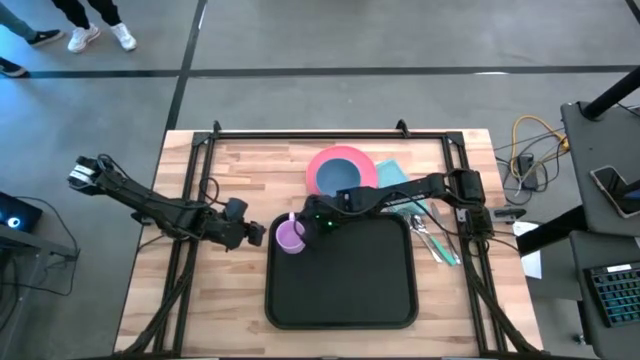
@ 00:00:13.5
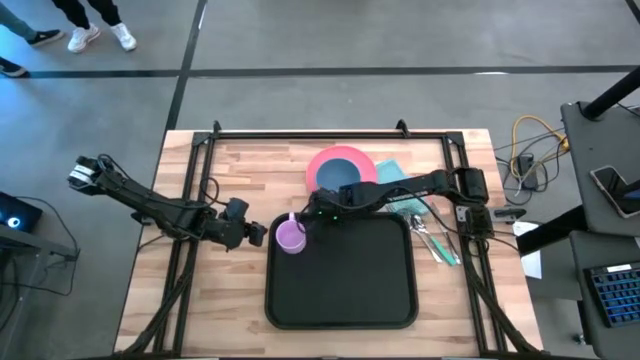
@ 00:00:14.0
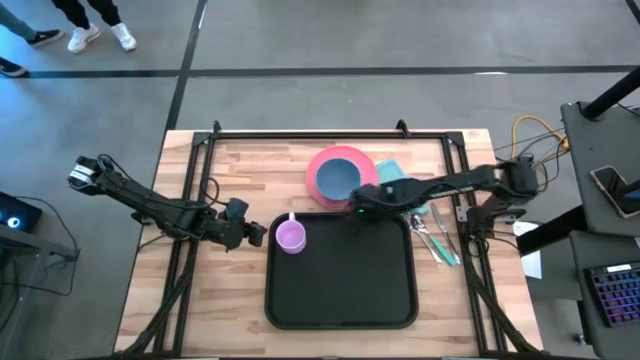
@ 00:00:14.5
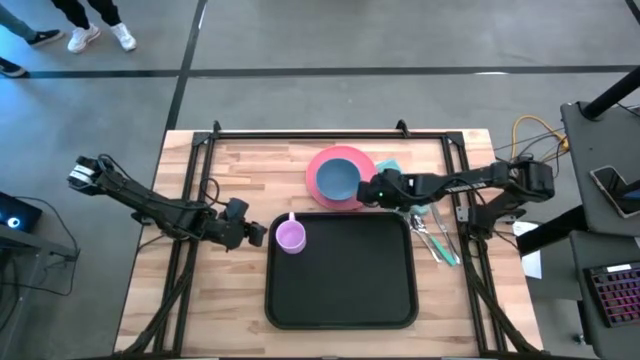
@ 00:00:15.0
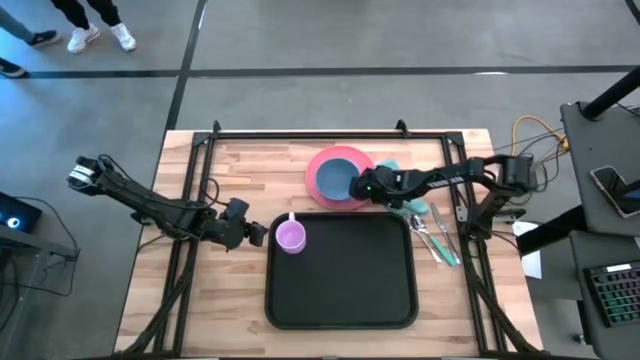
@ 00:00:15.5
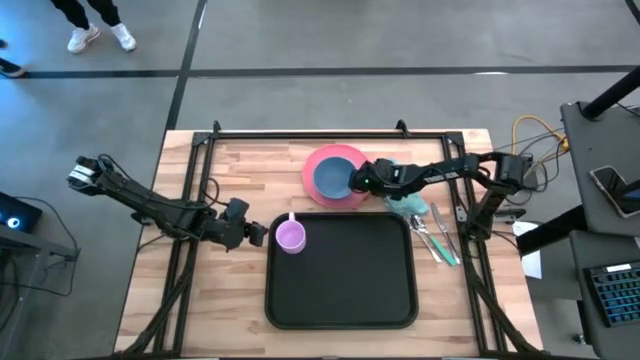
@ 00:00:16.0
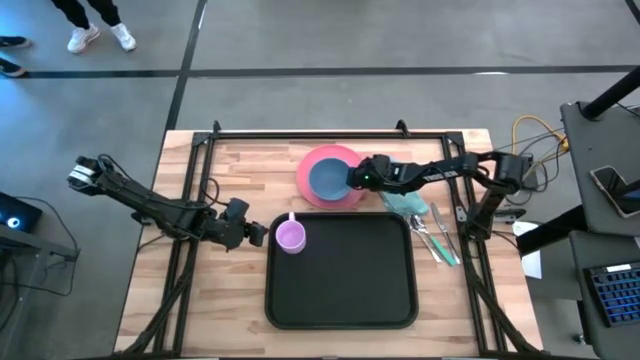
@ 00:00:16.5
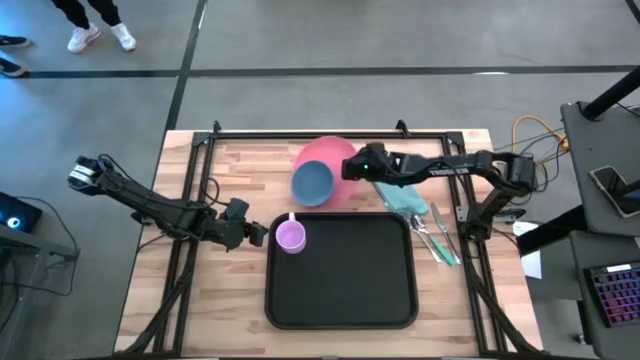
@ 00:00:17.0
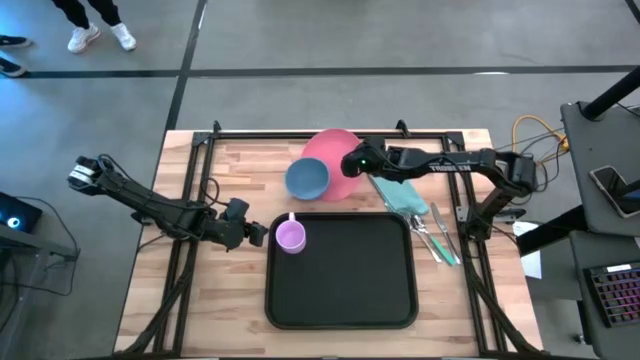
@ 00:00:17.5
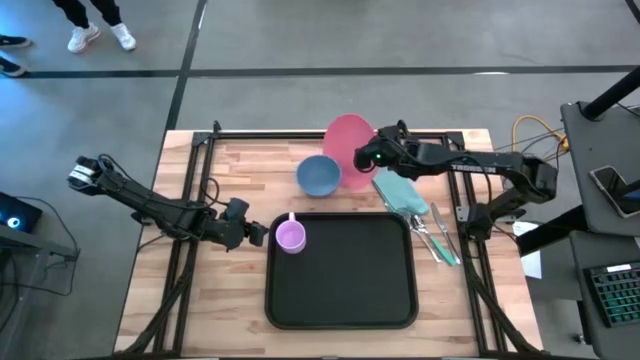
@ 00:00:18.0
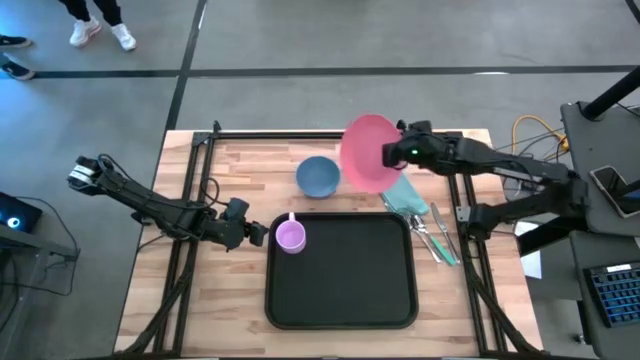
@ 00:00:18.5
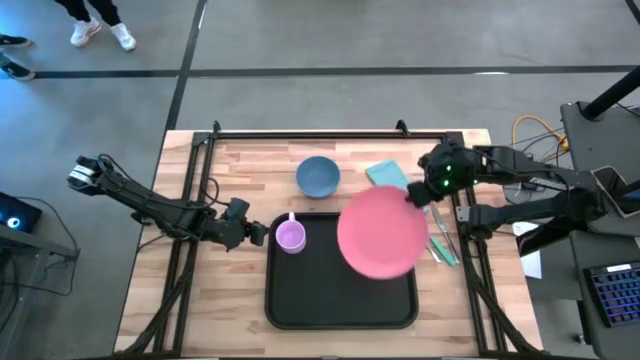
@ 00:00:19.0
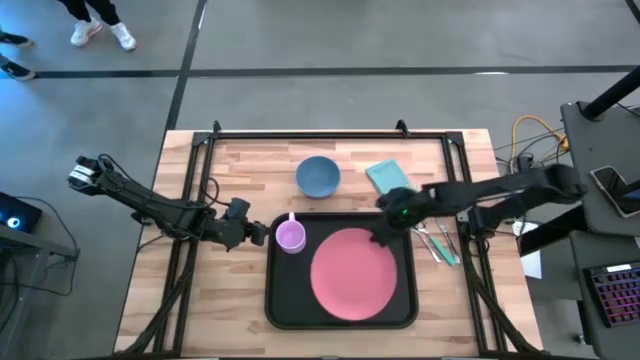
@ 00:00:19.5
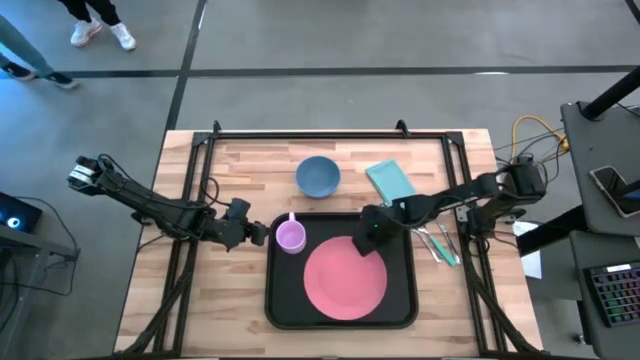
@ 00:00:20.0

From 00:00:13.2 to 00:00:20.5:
Task: Set up tray
Put the light orange plate at the bottom of the cup on the black serving tray

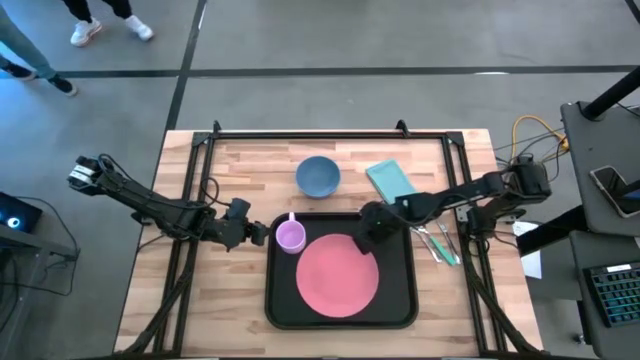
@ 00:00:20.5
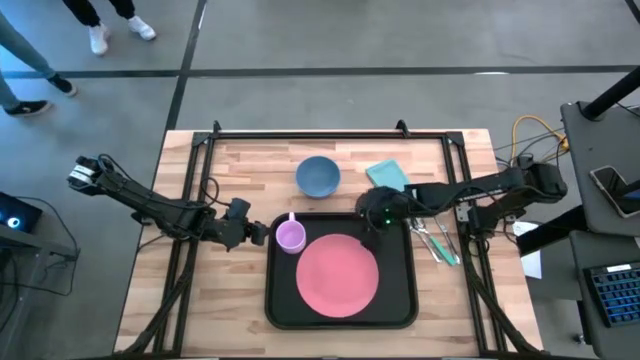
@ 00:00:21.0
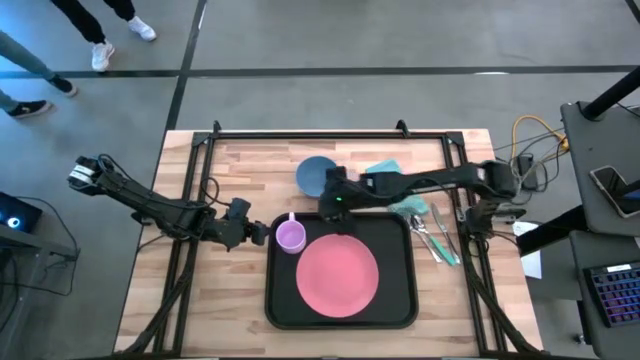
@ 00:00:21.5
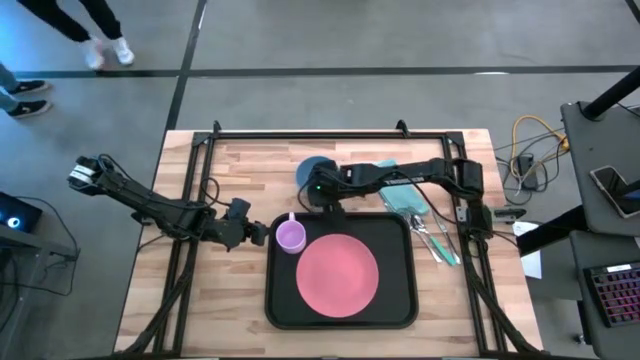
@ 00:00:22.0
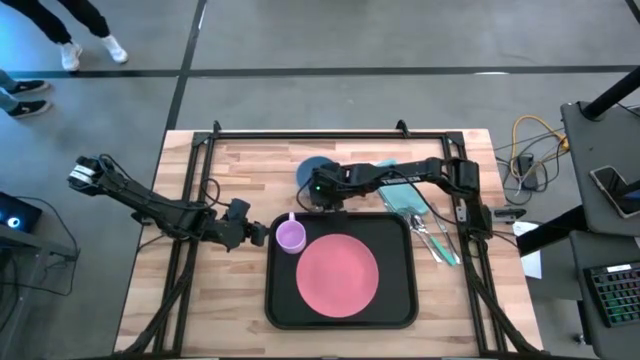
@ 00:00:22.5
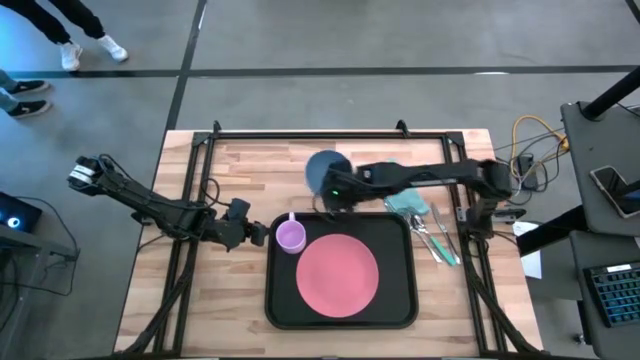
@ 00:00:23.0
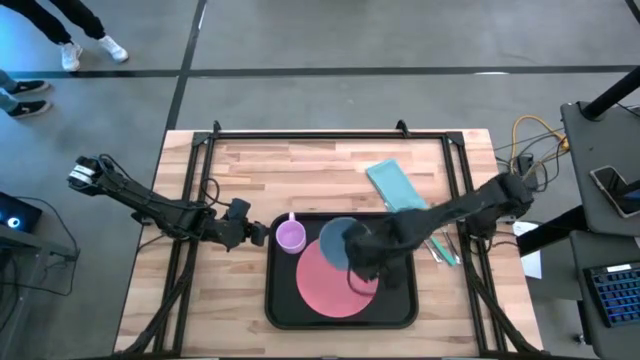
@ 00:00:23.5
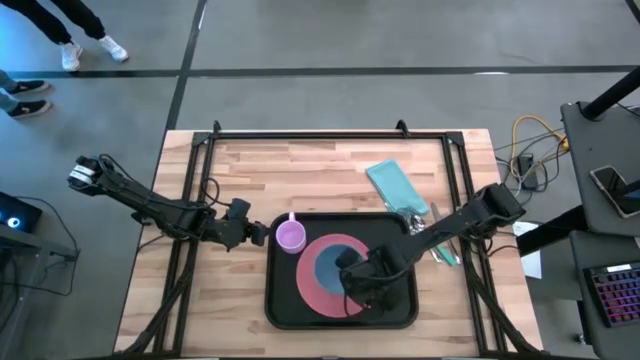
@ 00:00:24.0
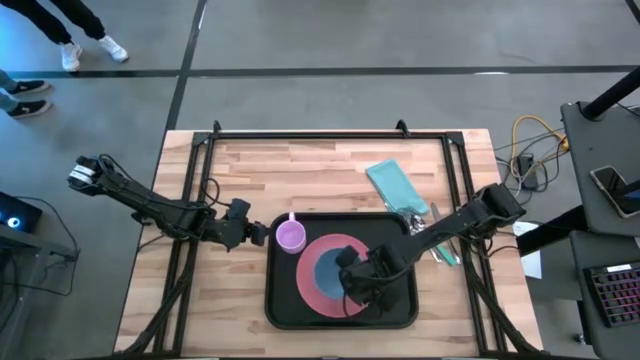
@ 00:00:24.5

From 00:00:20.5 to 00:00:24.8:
Put the blue bowl on the light orange plate on the black serving tray

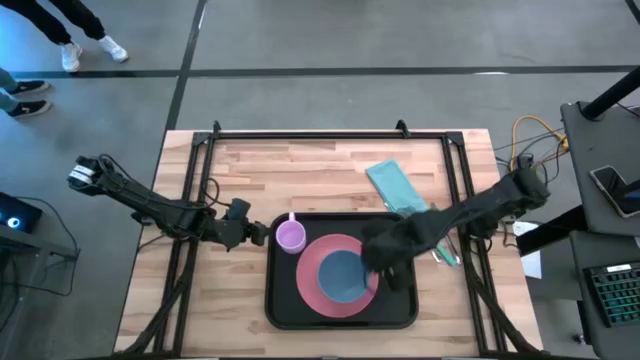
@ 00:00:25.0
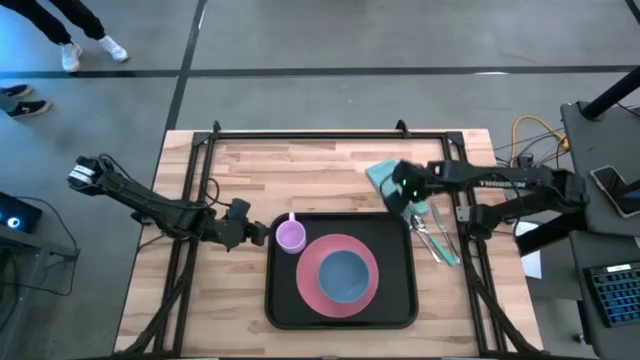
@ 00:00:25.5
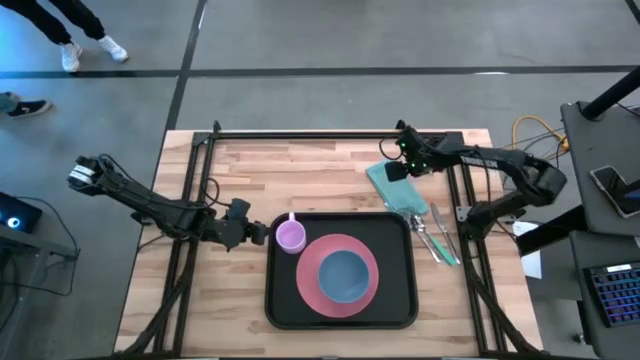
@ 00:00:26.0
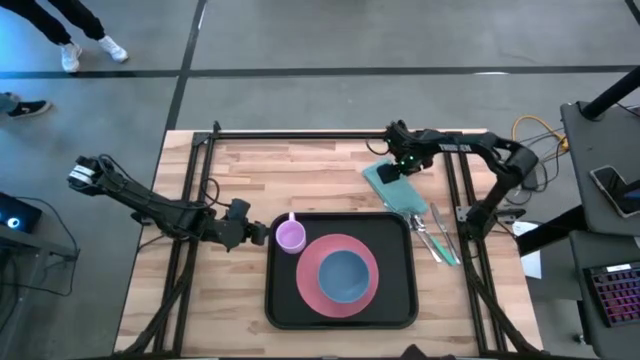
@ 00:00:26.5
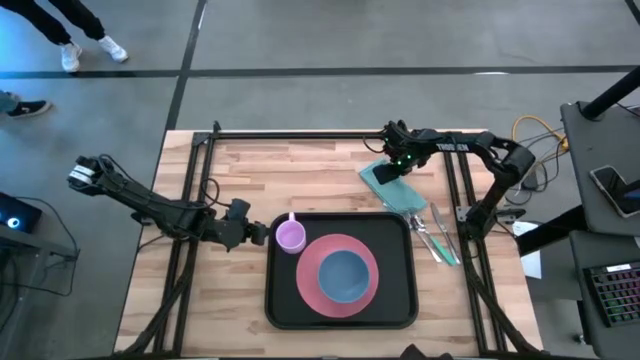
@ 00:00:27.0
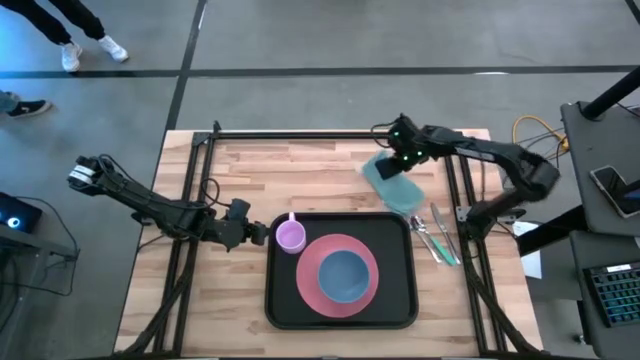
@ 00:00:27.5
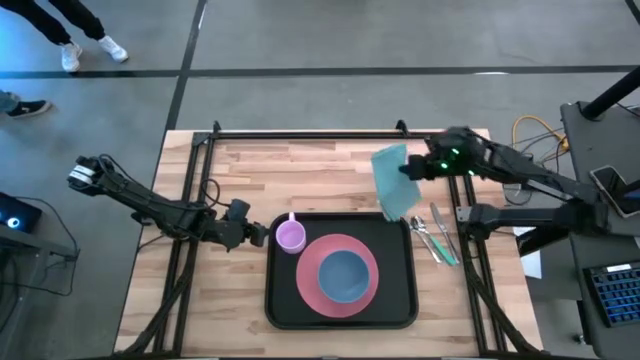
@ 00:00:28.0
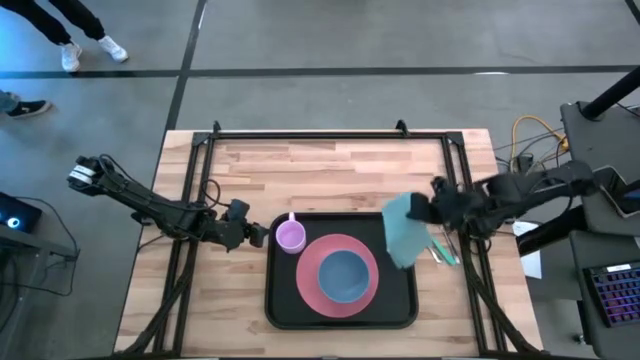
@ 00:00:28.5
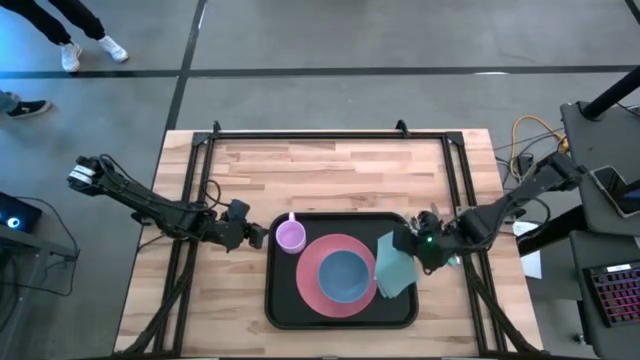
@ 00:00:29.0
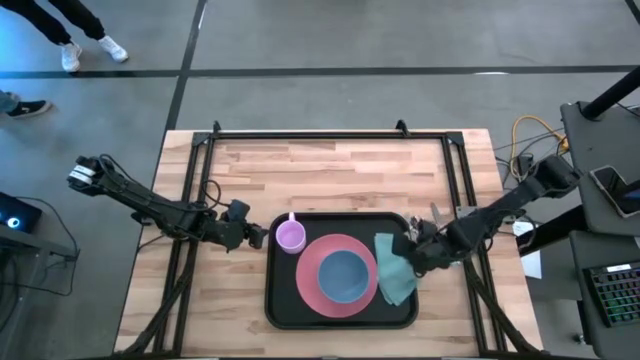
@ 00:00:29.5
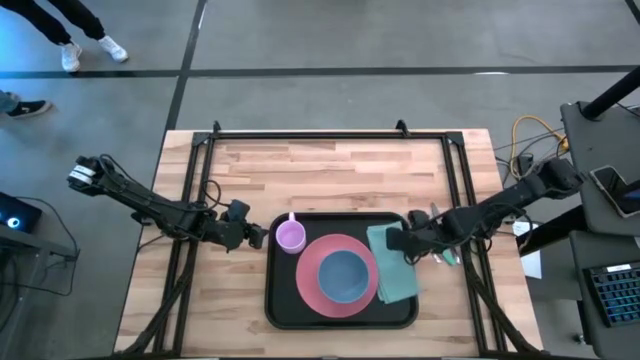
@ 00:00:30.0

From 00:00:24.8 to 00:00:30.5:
Put the green napkin to the right of the light orange plate on the black serving tray

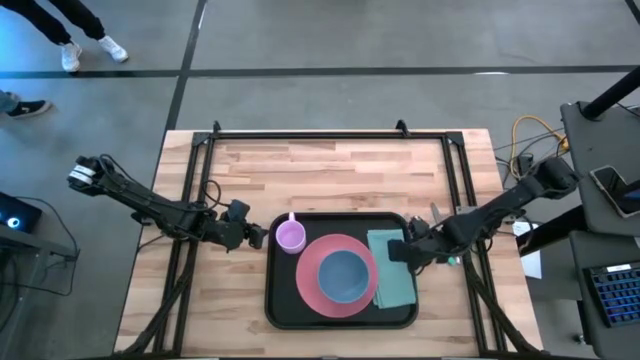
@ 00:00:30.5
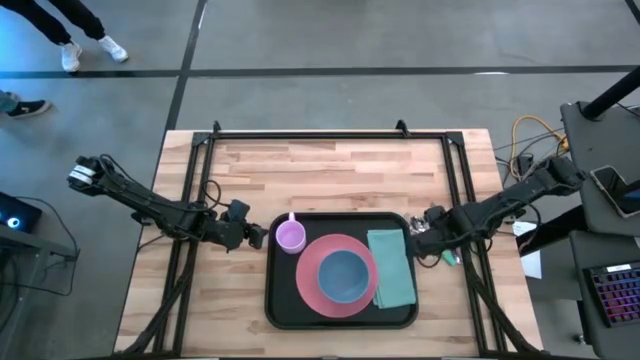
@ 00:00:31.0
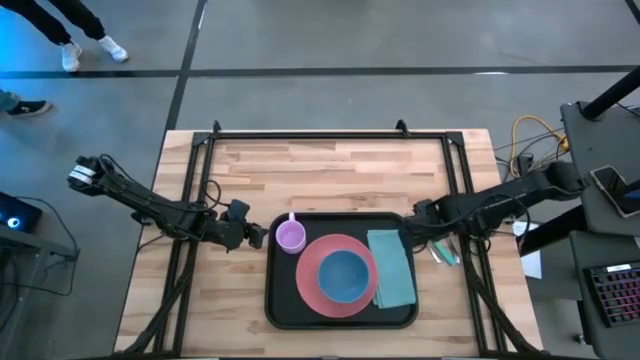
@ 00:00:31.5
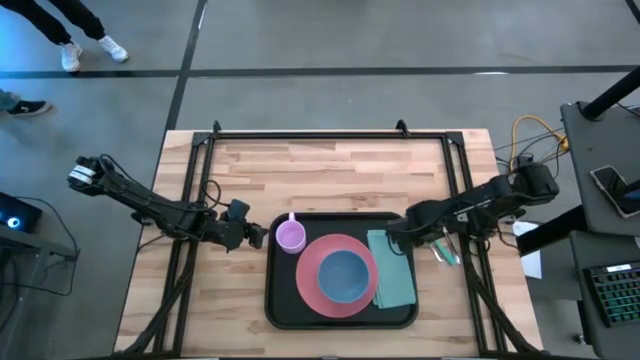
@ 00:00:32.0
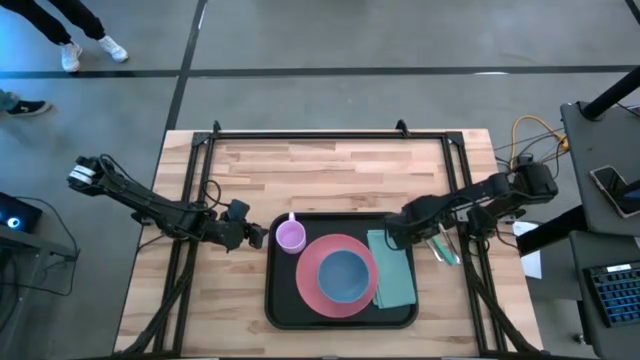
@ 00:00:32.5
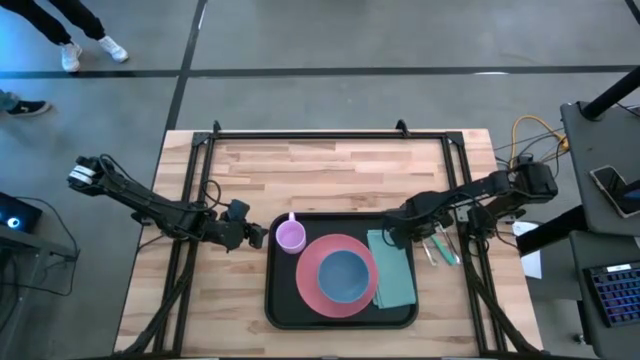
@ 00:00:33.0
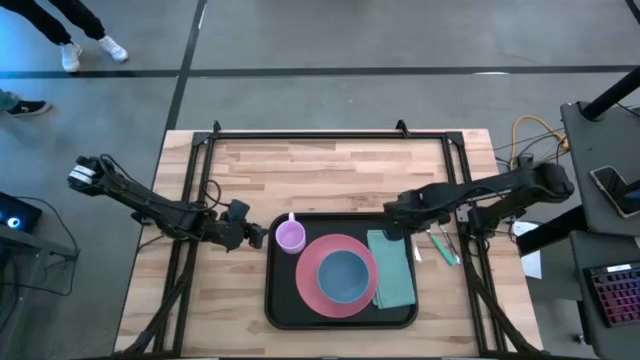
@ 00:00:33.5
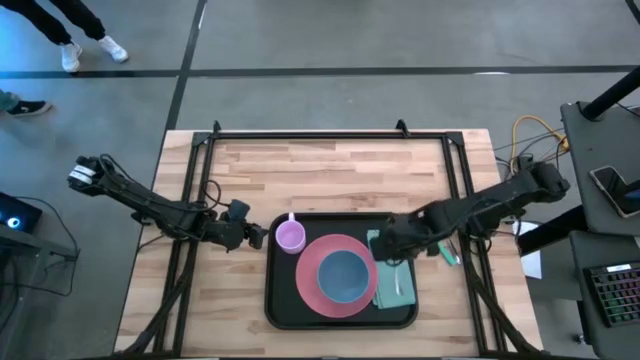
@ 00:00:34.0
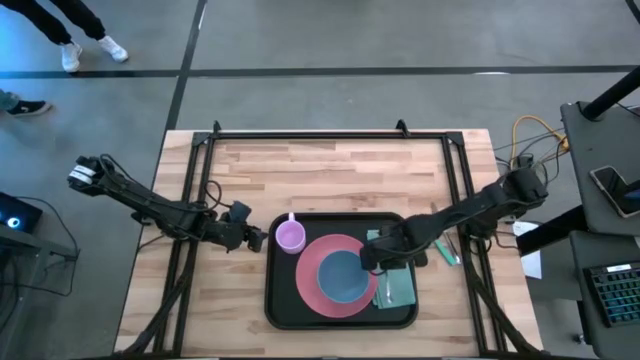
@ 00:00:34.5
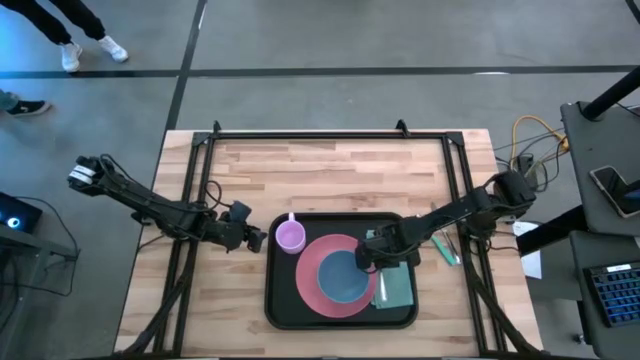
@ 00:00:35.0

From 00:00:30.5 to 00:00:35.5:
Put the silver fork to the right of the pink plate on the napkin

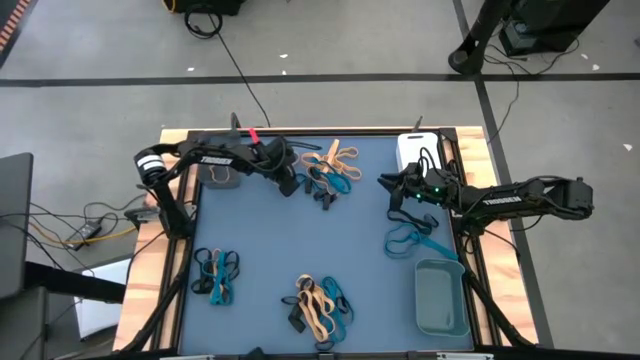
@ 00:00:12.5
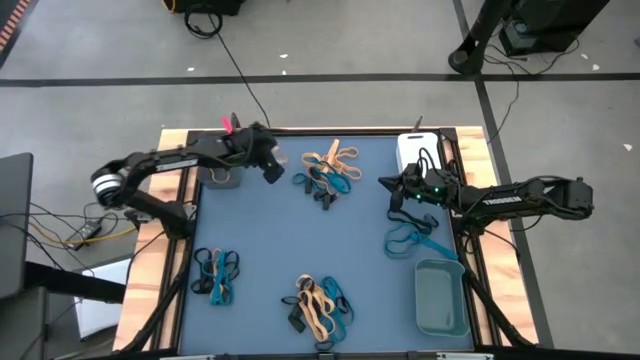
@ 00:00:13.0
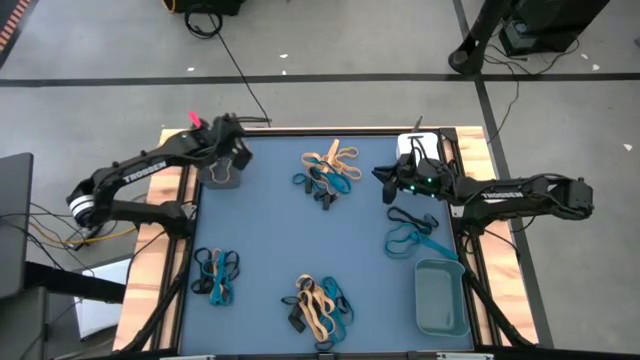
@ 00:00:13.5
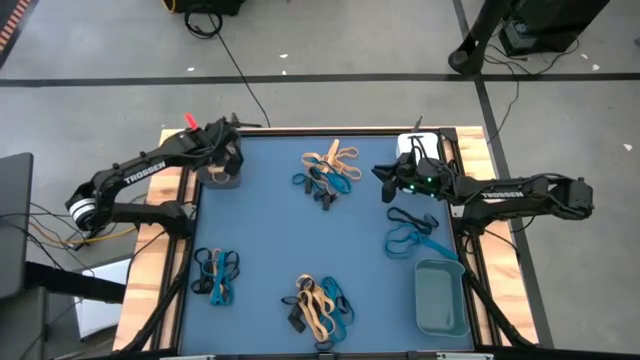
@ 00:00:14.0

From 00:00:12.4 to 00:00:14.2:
Task: Sort rubber bands into baskets
Put the yellow rubber band into the black bin
